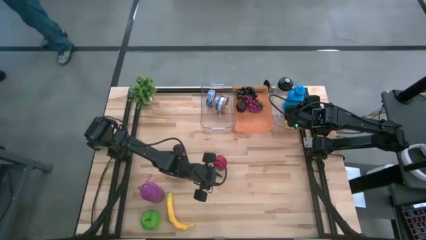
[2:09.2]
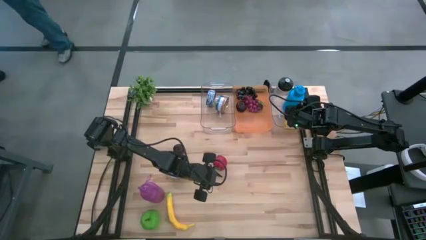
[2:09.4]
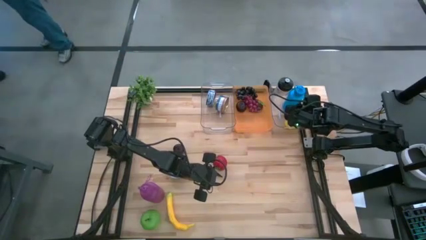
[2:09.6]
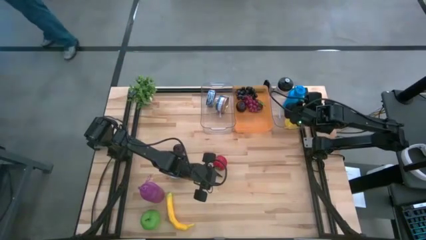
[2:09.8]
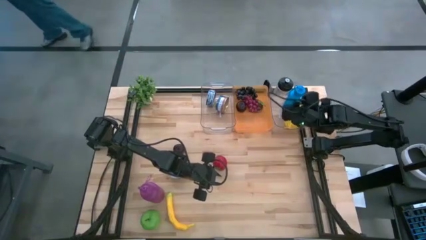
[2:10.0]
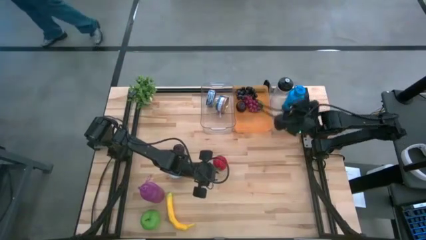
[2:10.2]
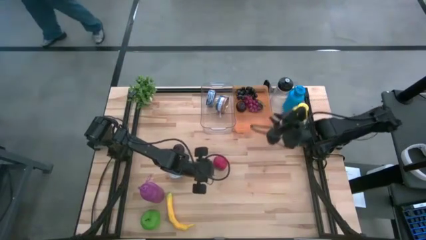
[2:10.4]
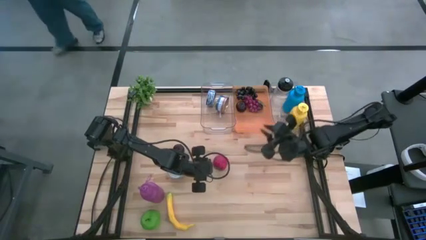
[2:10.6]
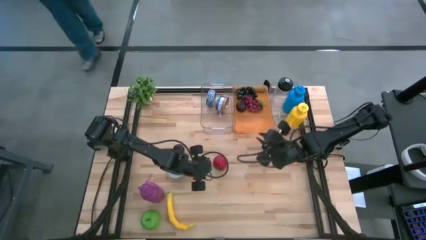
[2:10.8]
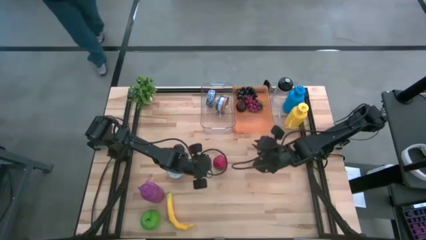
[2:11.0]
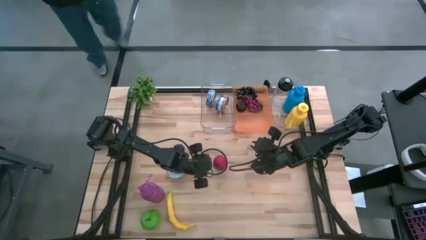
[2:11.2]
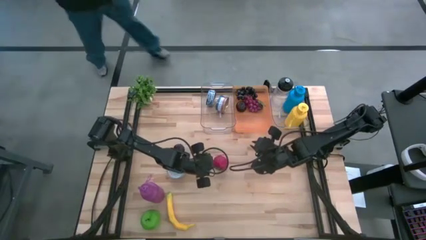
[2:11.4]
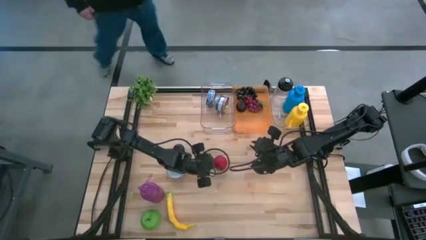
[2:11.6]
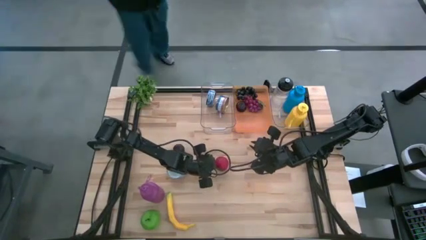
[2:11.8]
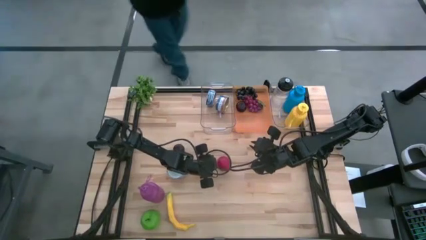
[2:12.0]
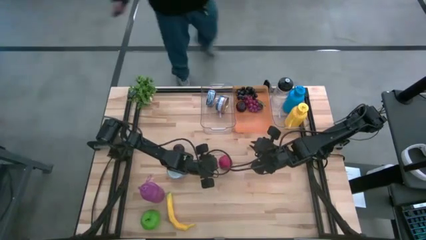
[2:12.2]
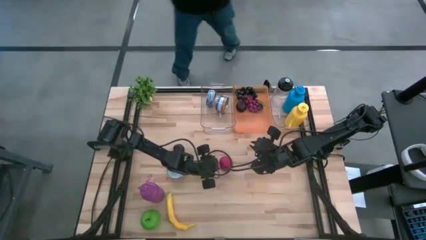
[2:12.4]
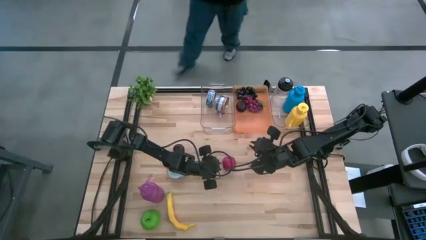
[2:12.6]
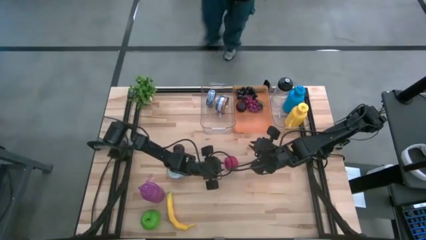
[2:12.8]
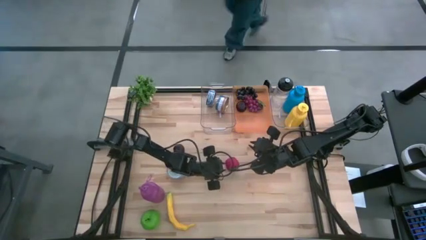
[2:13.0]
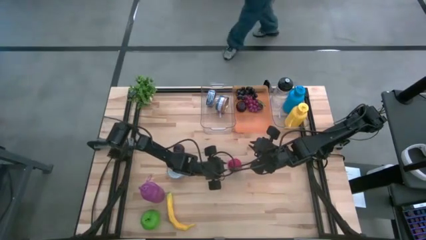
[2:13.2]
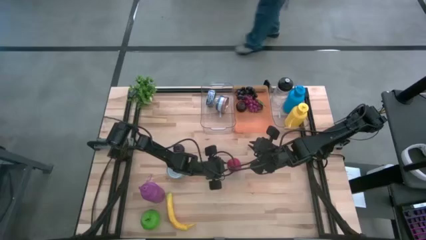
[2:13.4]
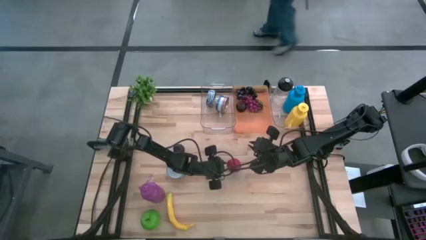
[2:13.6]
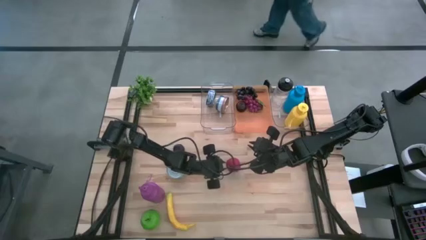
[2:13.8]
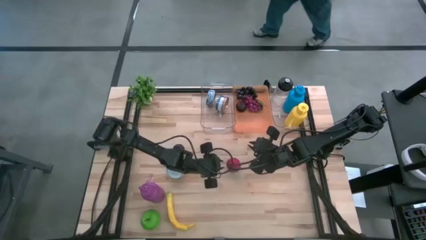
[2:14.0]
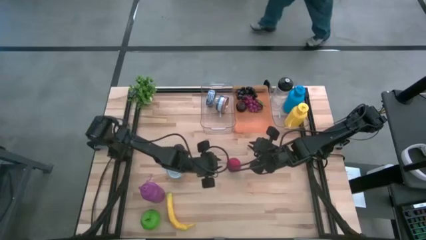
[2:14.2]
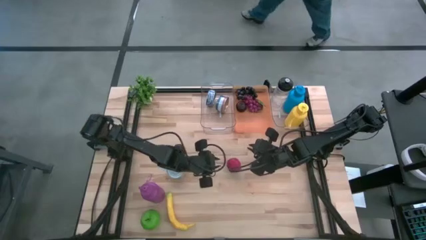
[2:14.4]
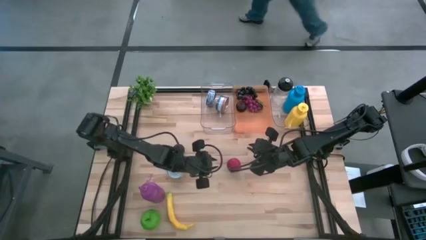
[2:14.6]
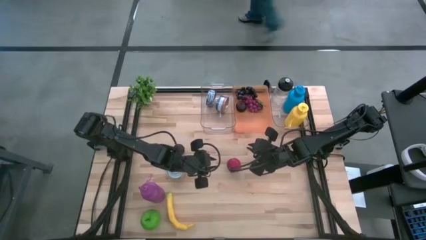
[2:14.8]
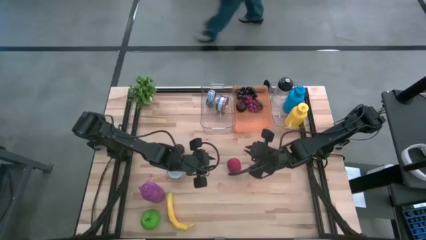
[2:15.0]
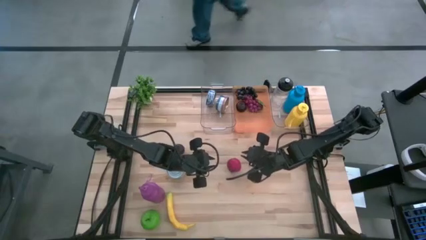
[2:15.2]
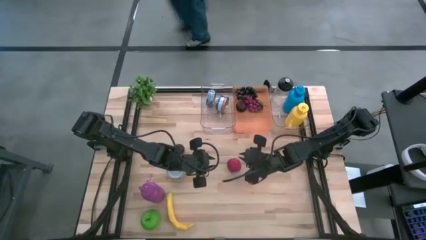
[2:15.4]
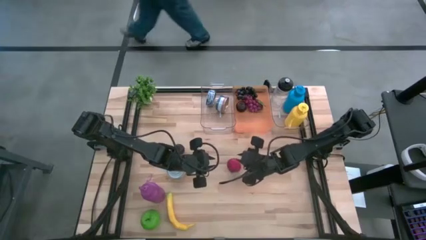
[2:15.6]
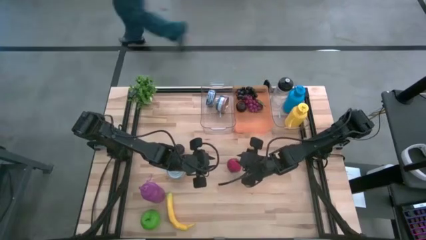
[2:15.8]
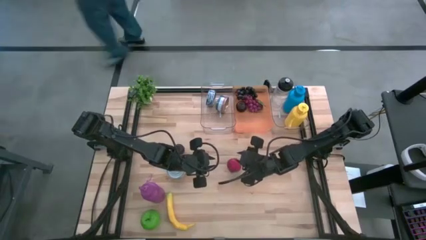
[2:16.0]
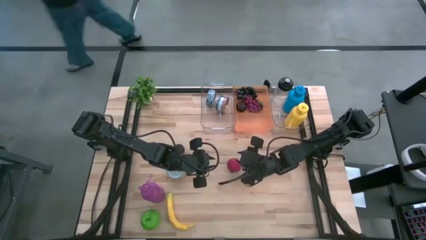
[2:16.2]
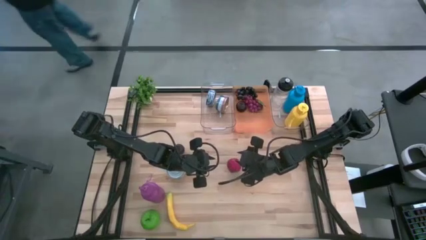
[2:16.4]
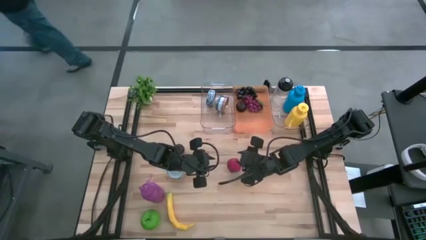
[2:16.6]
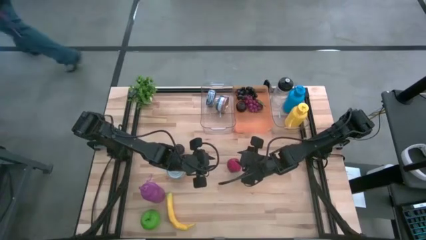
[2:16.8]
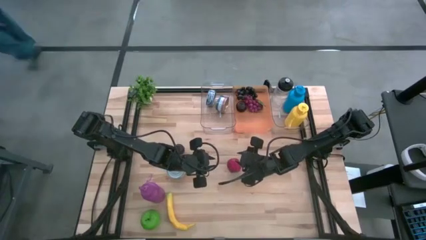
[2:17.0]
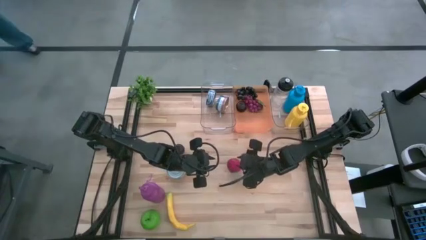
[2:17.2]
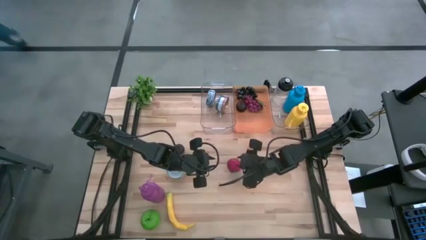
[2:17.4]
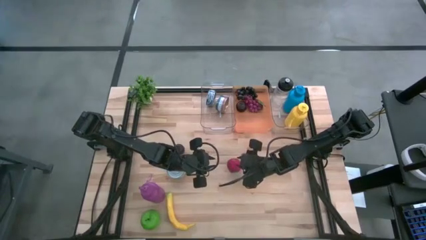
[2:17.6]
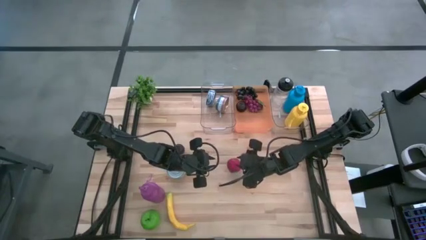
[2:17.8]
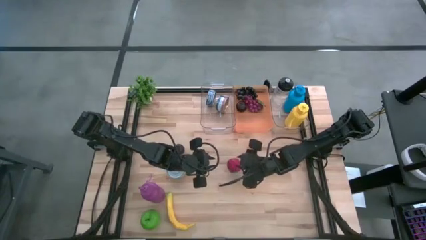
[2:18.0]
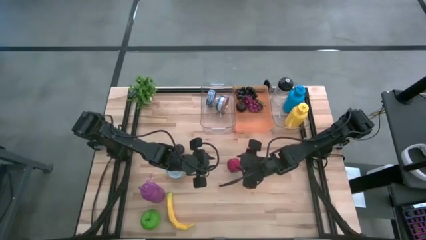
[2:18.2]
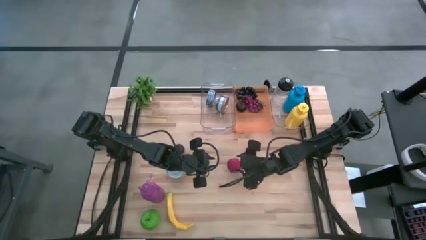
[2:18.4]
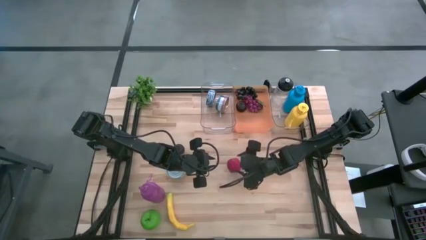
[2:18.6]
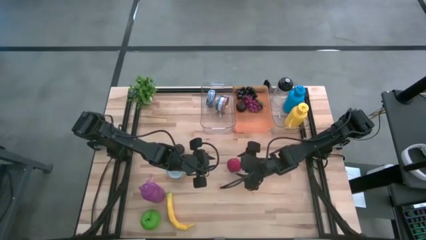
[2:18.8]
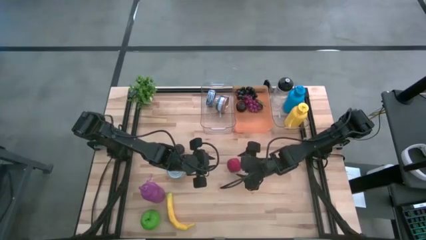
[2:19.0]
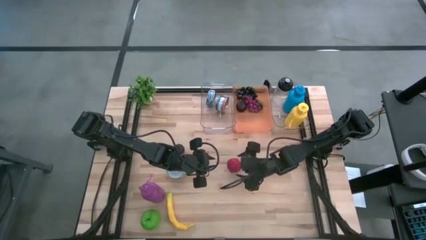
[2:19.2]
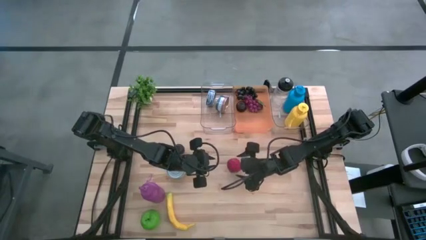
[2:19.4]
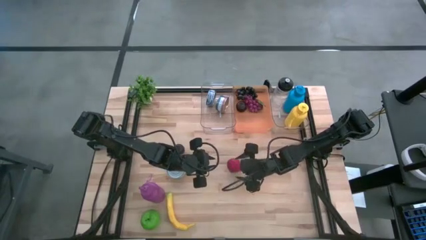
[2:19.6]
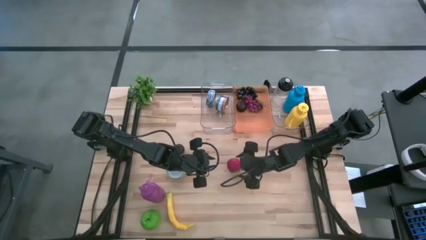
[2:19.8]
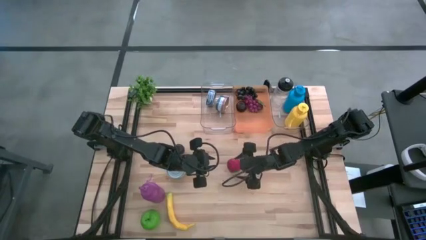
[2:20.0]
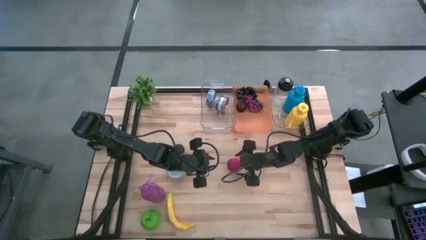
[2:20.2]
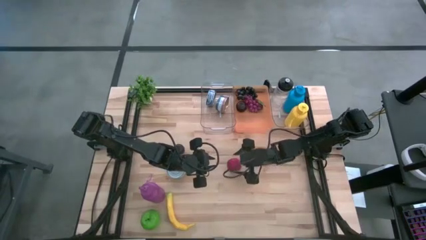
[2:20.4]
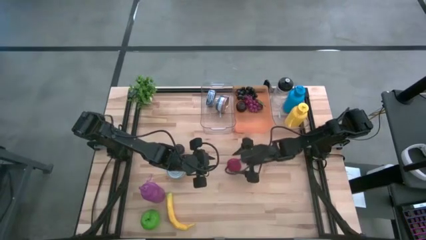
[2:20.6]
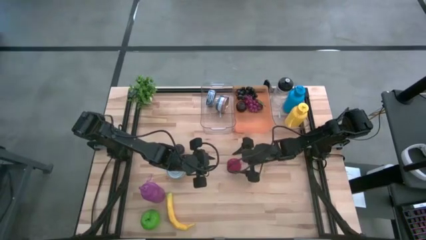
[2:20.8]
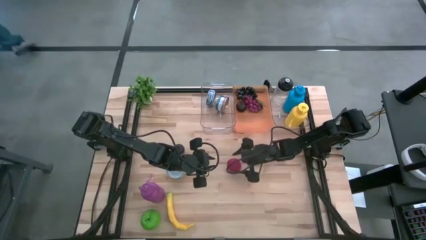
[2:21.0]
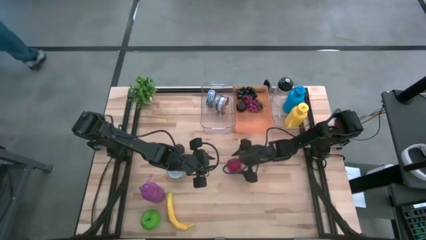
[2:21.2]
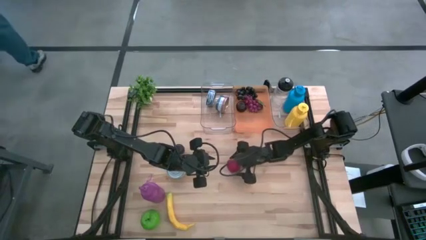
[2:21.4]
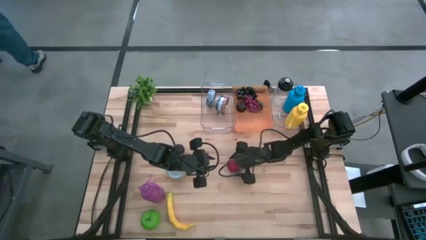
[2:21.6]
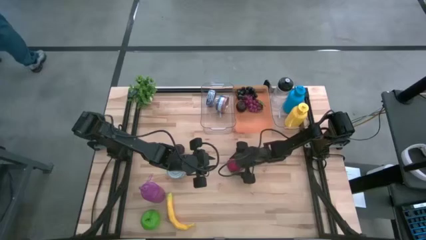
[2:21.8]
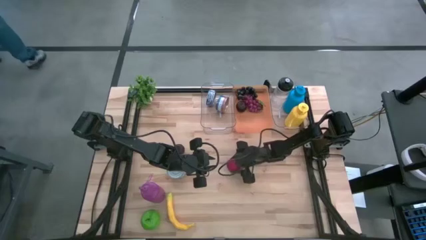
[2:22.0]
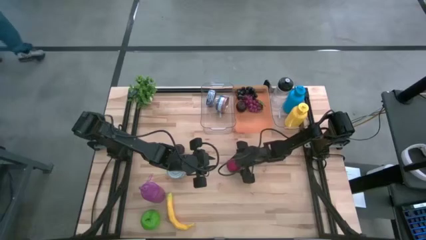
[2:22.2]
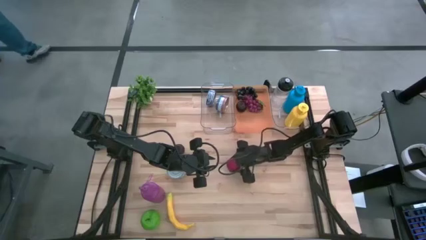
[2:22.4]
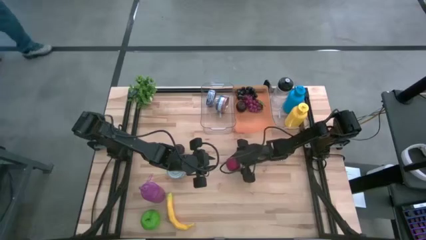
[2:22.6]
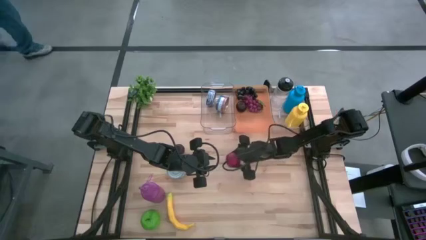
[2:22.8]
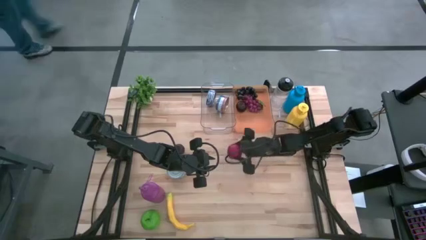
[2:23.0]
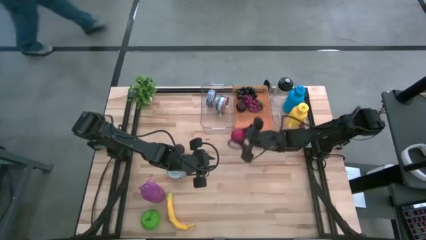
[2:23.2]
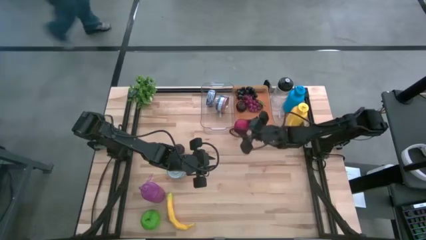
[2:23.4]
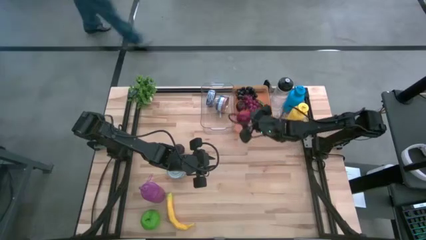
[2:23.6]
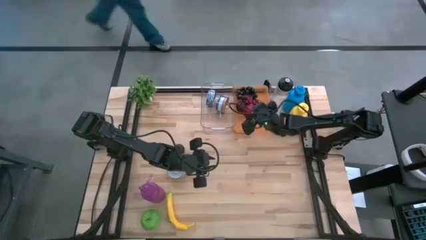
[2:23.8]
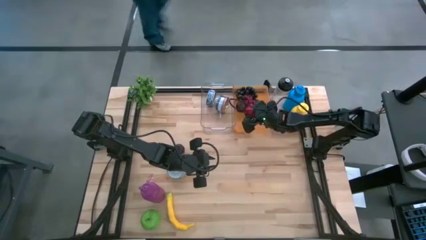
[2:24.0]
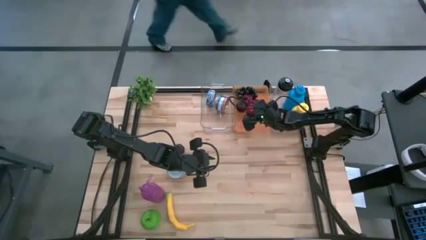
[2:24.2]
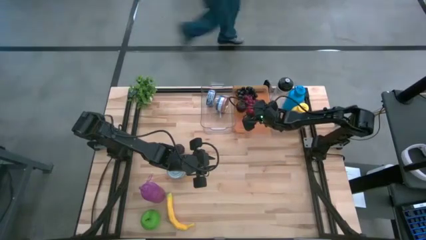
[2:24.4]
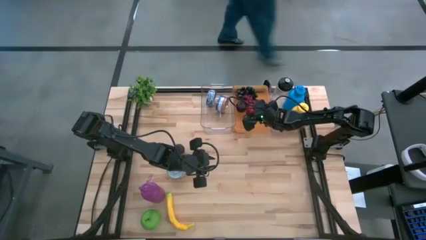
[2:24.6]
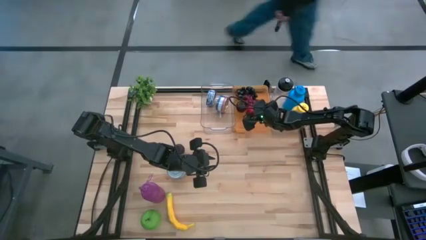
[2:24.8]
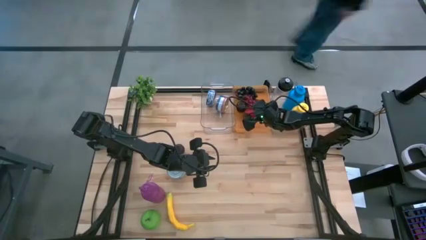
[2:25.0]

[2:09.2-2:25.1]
Task: Pick & Place Food Item
Put the red tomato into the orange bin
